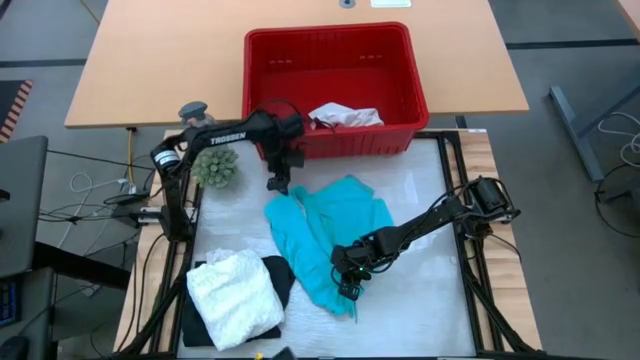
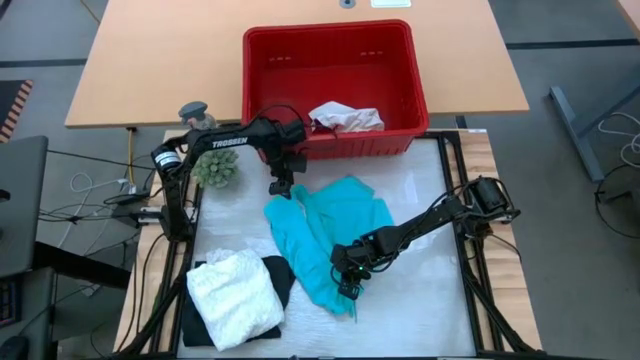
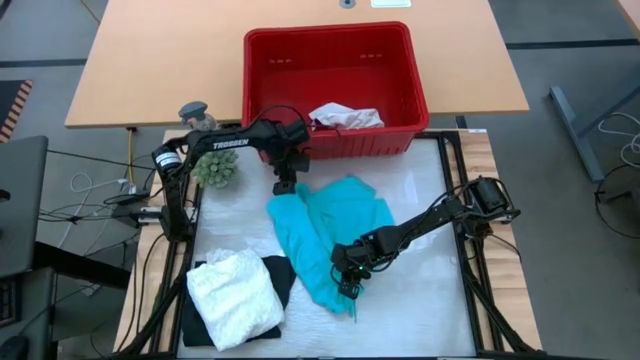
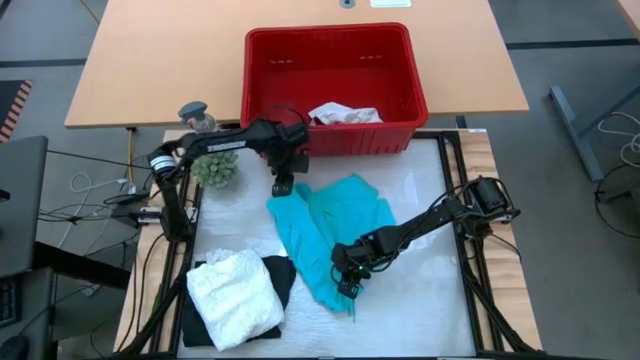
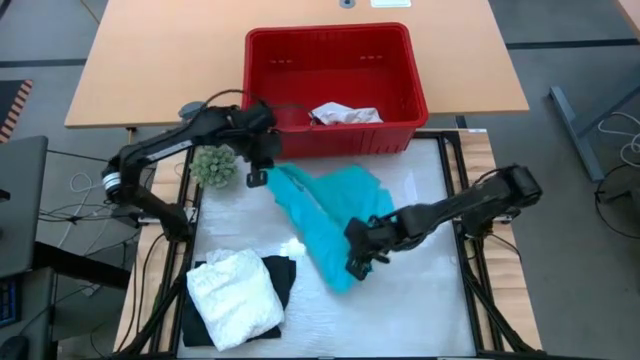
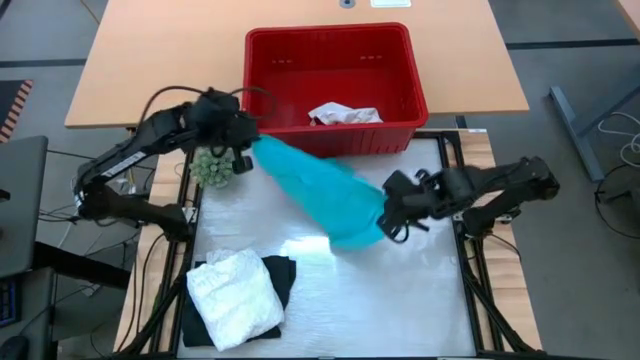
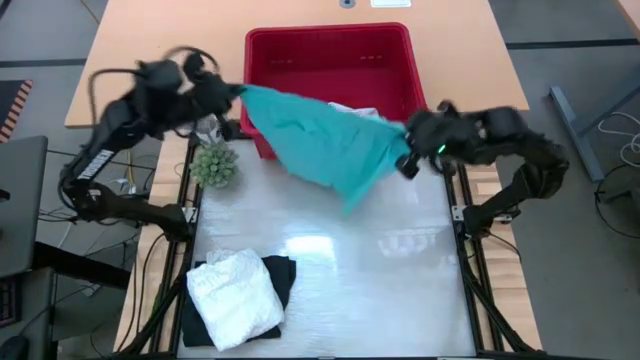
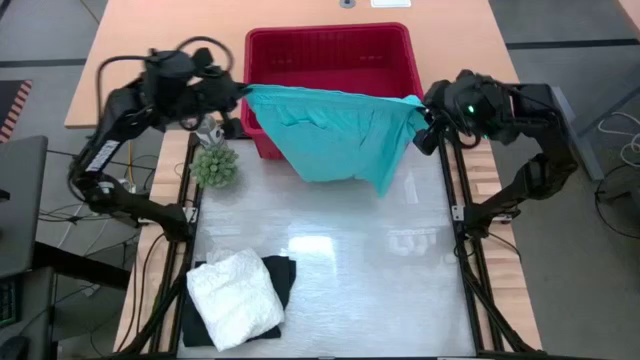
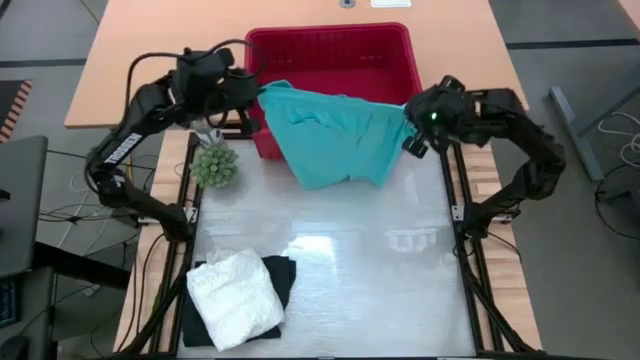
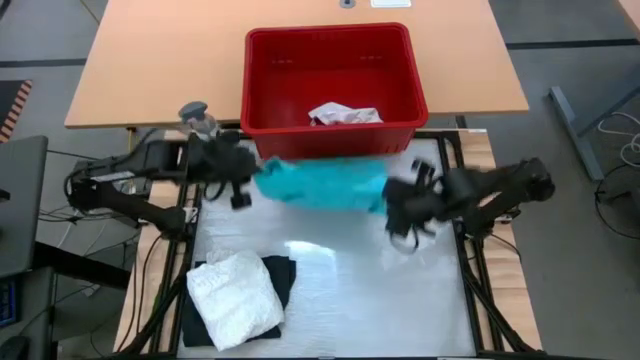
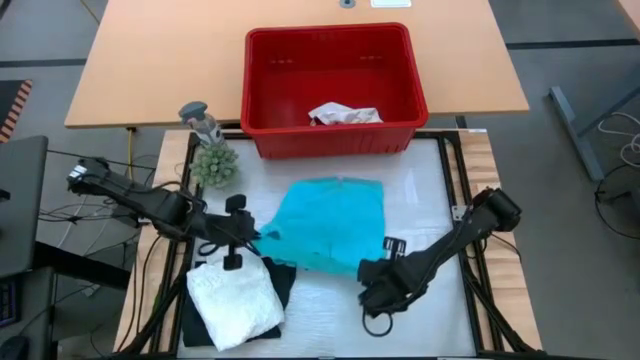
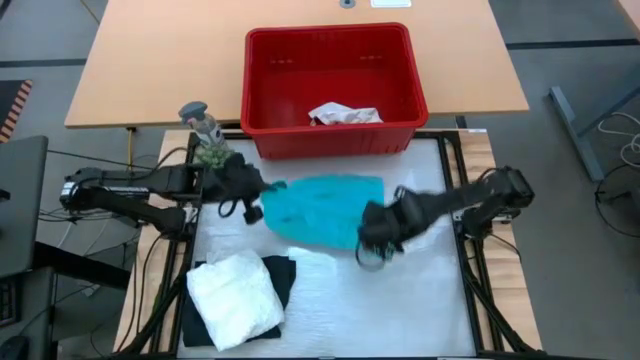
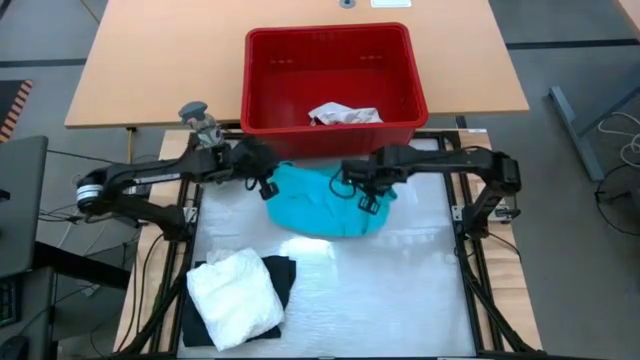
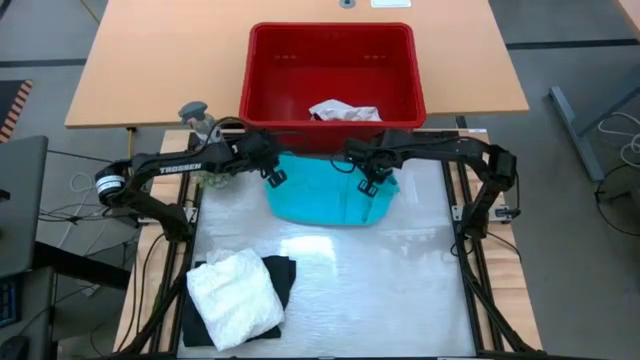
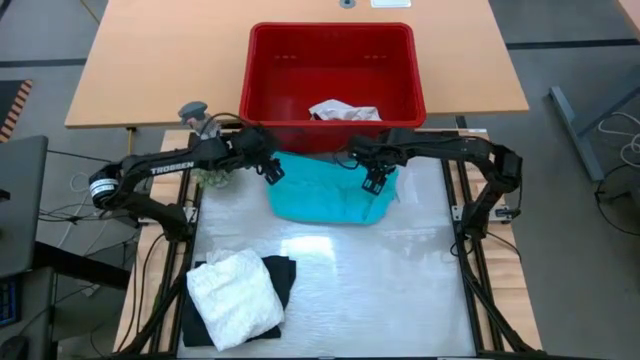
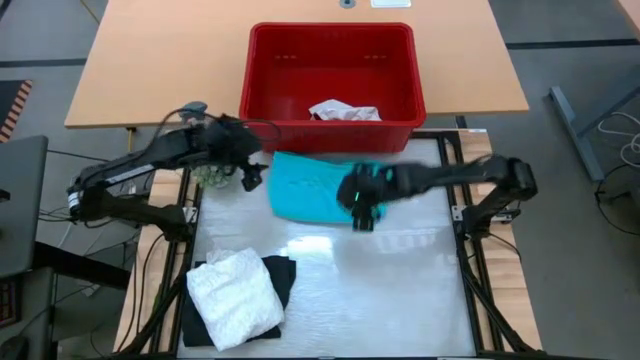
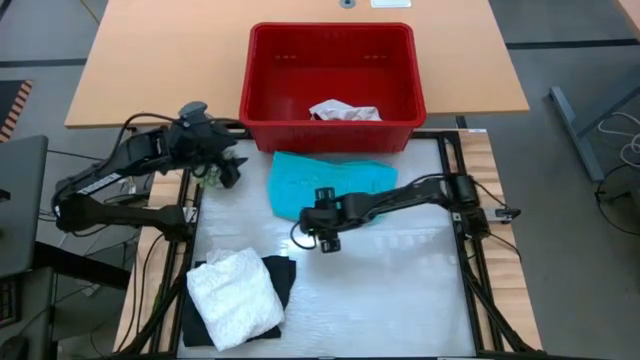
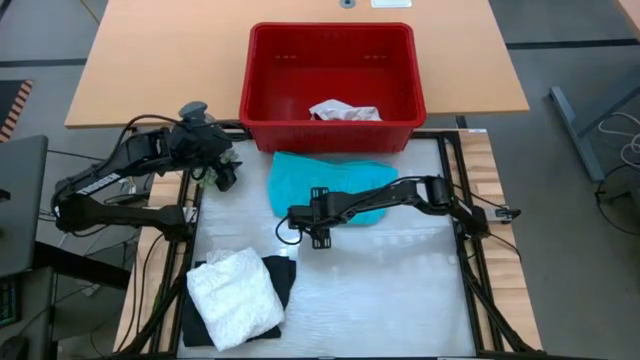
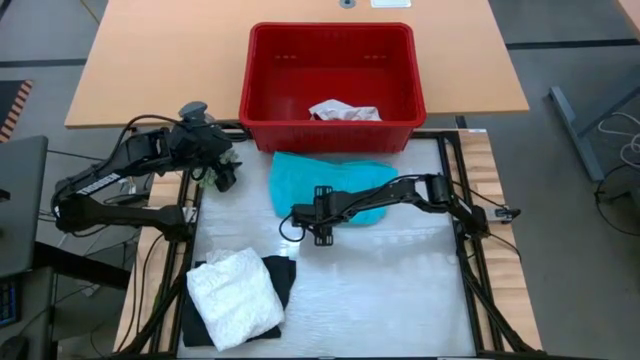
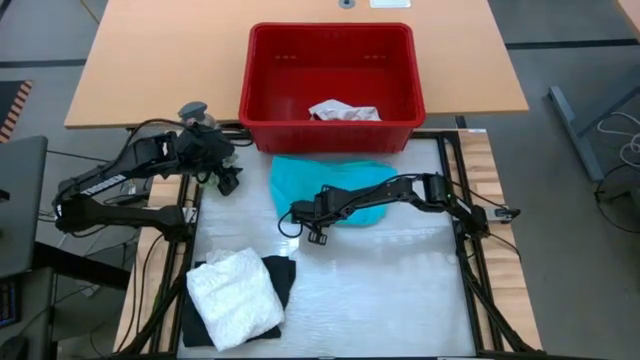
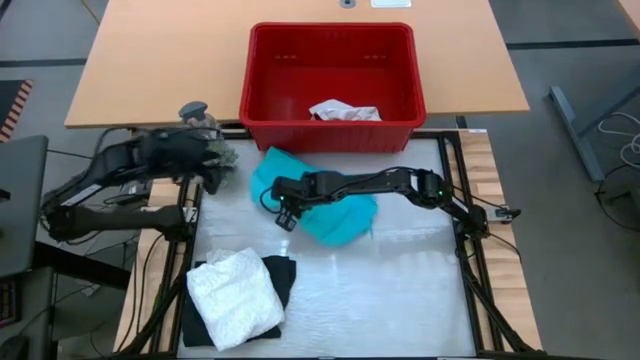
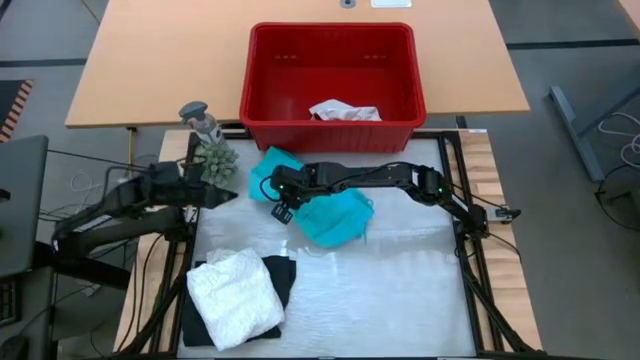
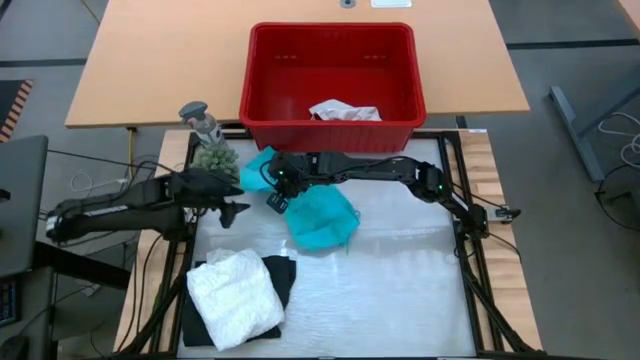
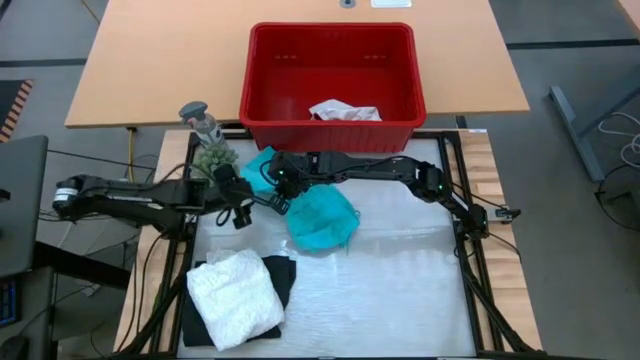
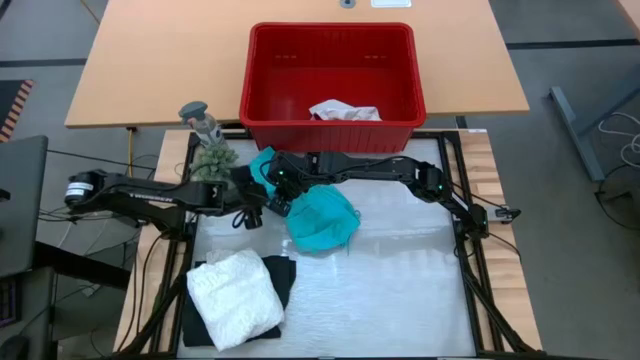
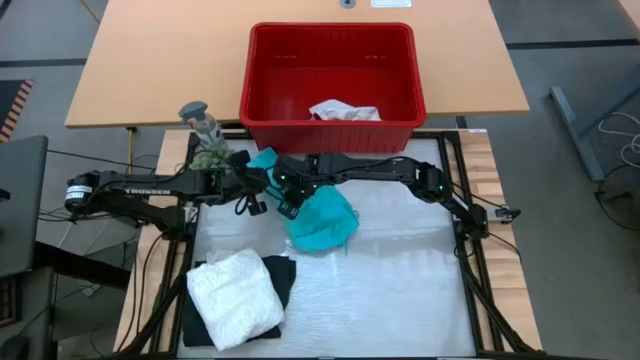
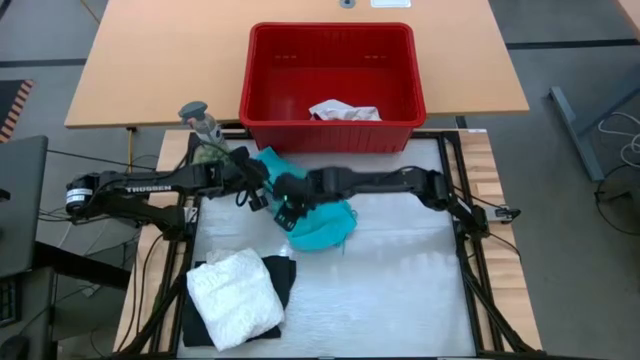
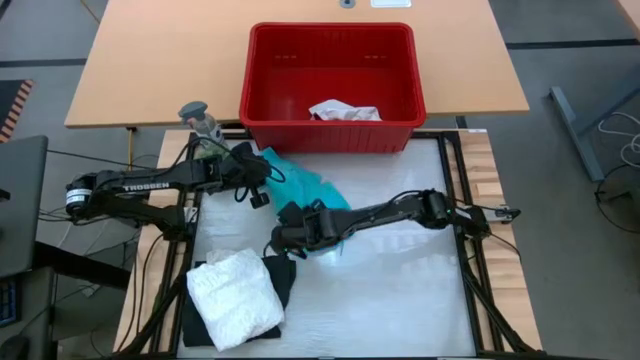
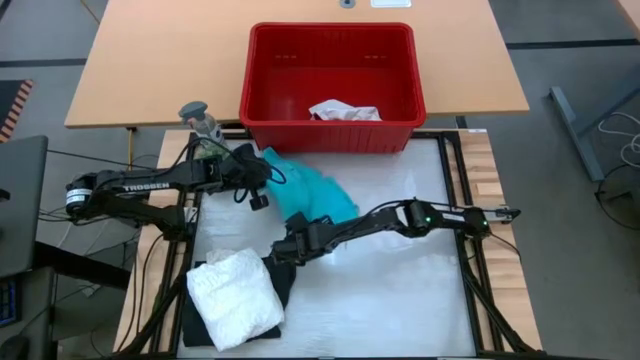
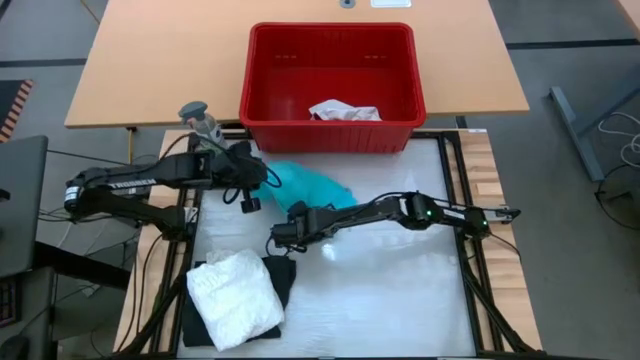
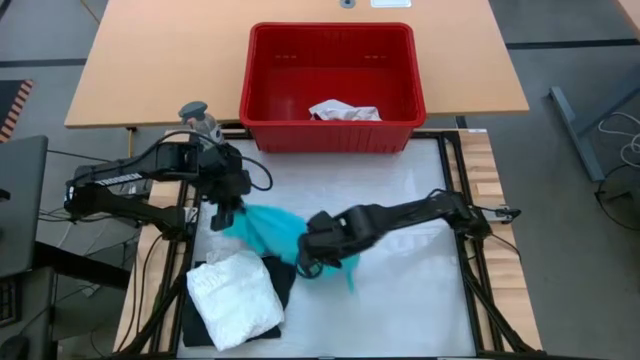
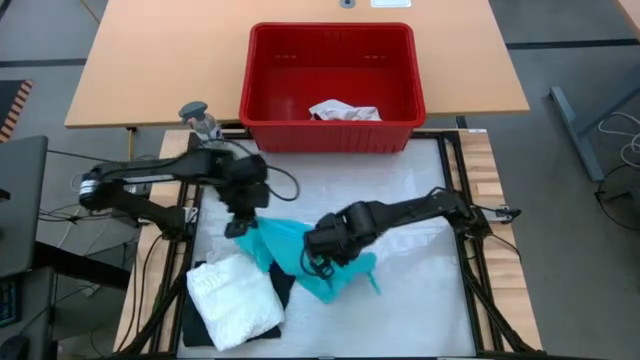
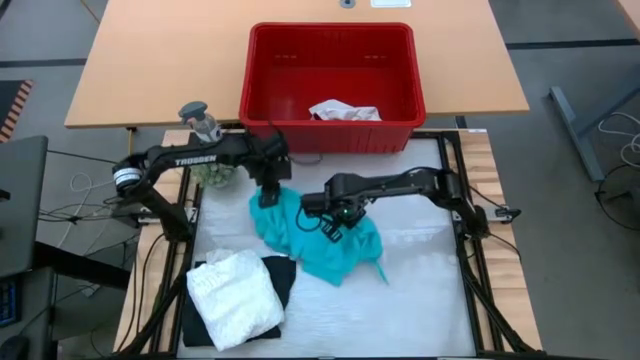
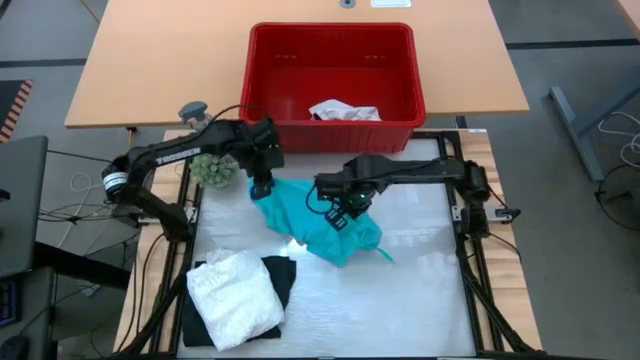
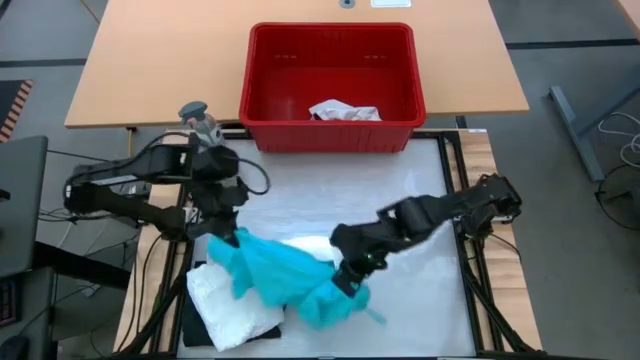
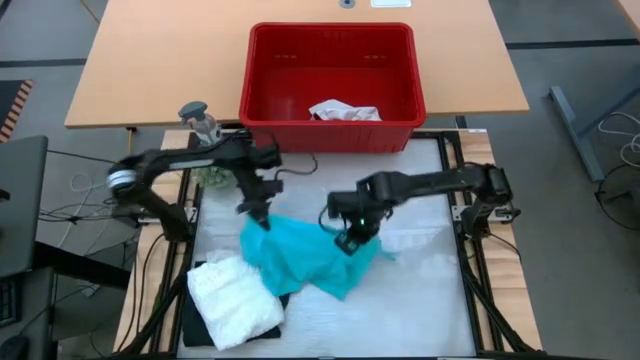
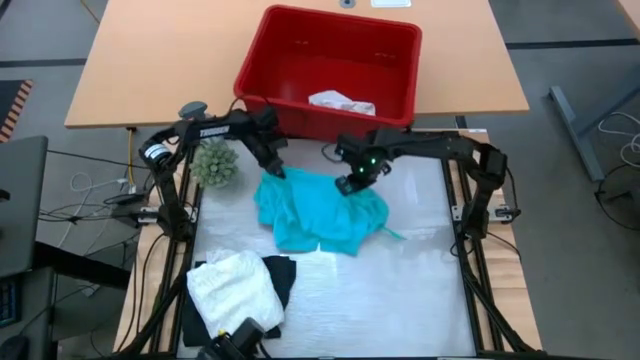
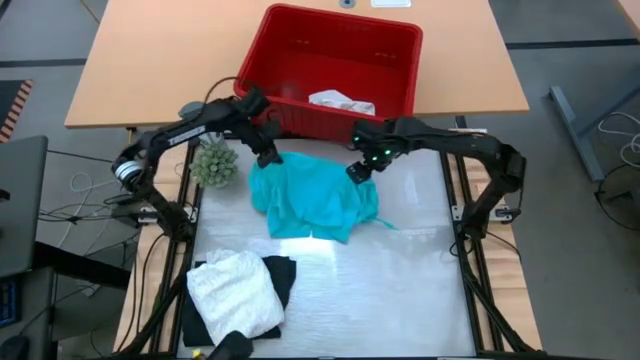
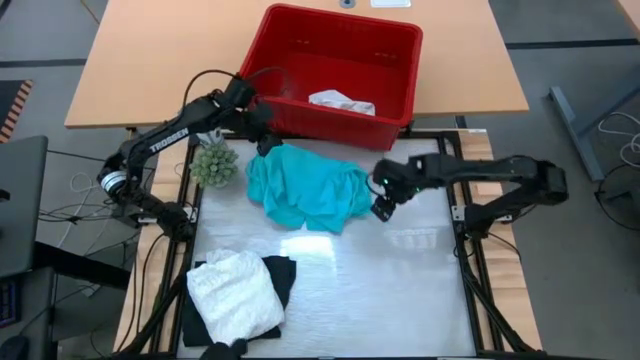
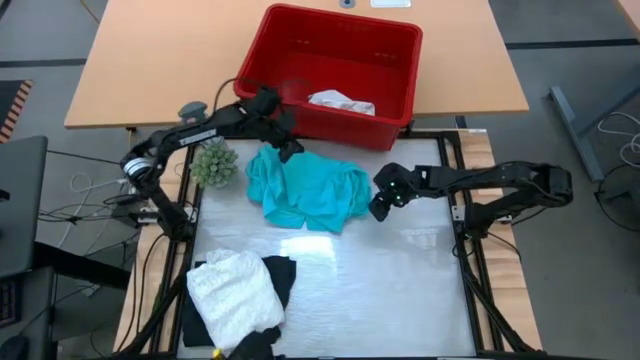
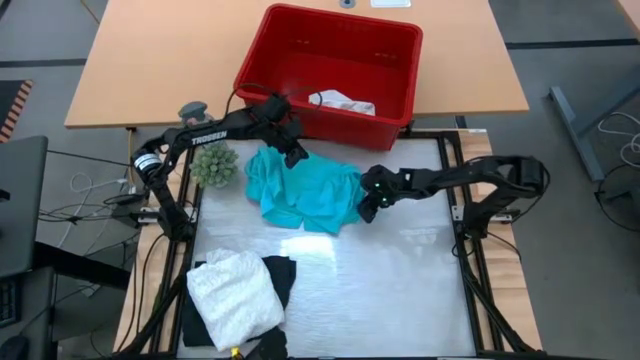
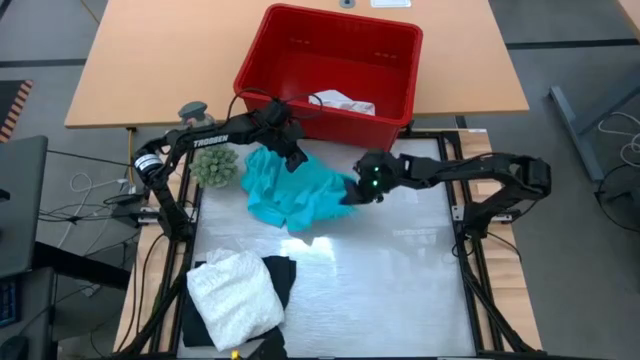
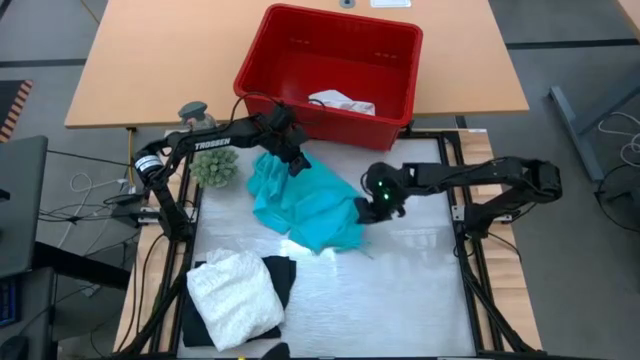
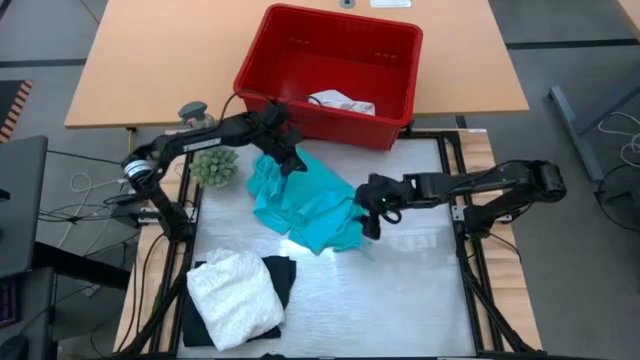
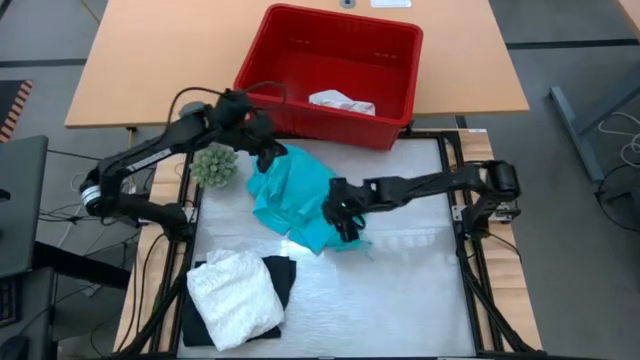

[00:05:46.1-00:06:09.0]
Task: Fold Laundry from Bin
Fold the blue shorts
